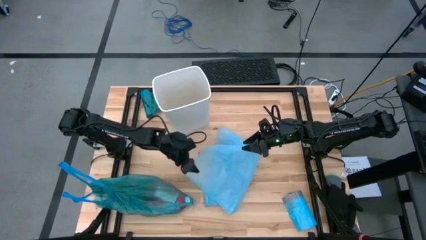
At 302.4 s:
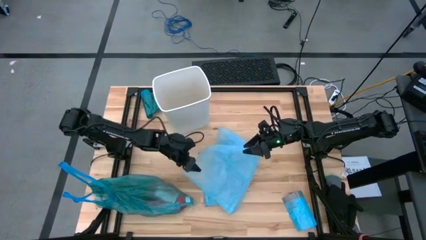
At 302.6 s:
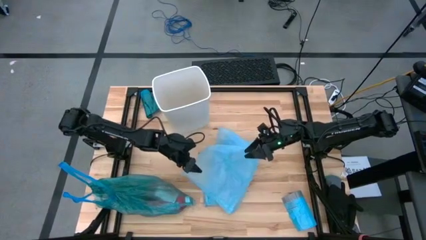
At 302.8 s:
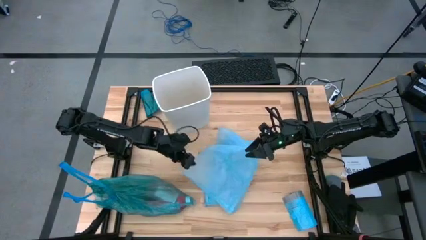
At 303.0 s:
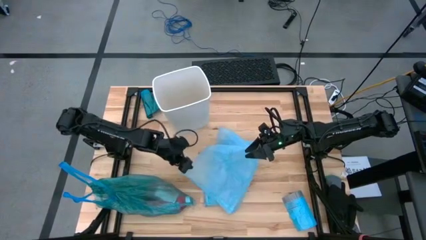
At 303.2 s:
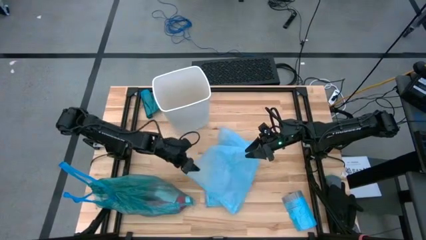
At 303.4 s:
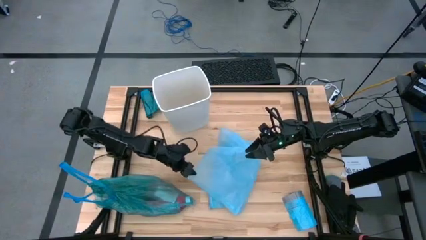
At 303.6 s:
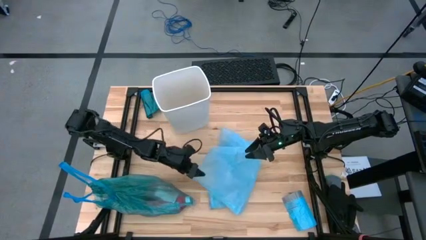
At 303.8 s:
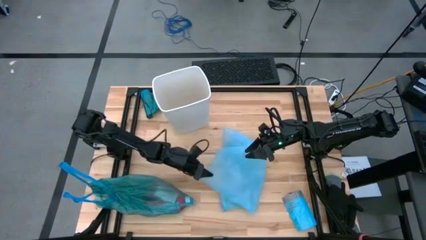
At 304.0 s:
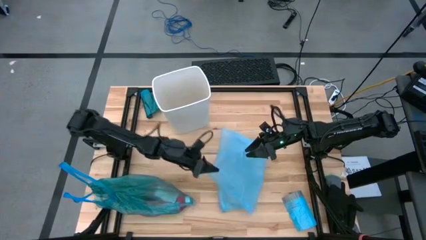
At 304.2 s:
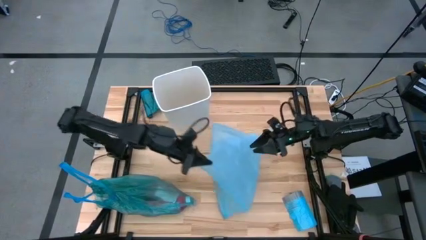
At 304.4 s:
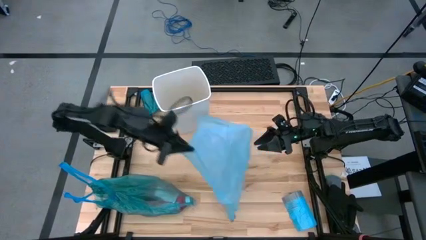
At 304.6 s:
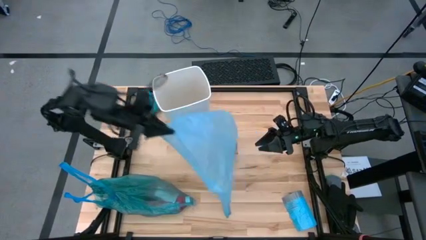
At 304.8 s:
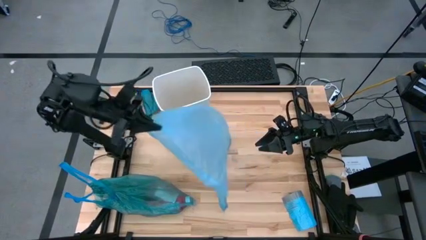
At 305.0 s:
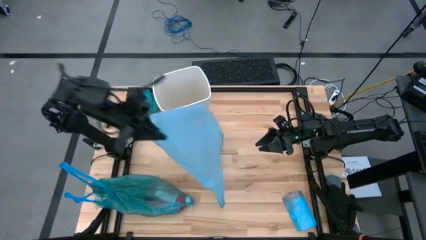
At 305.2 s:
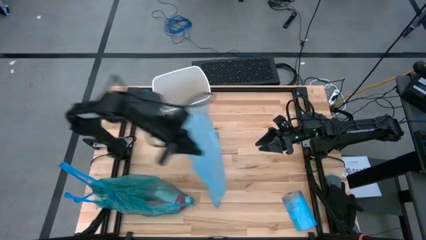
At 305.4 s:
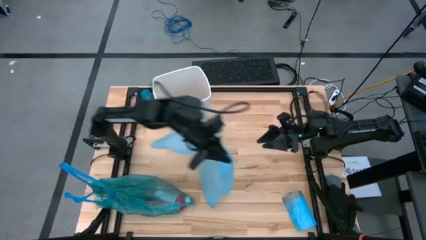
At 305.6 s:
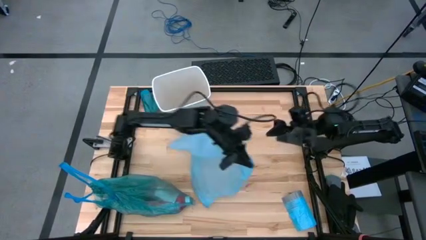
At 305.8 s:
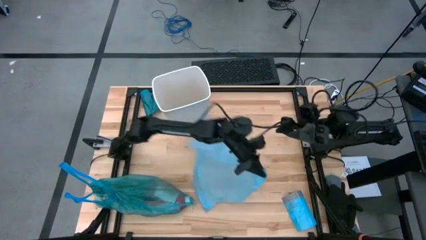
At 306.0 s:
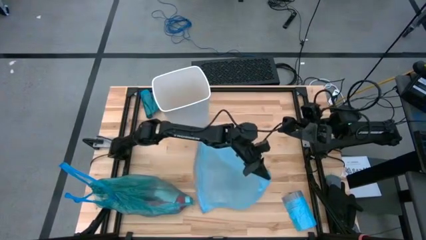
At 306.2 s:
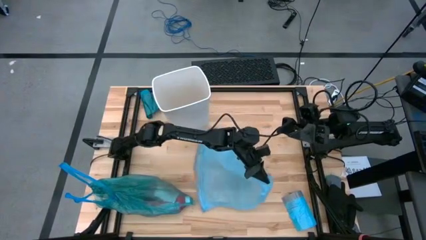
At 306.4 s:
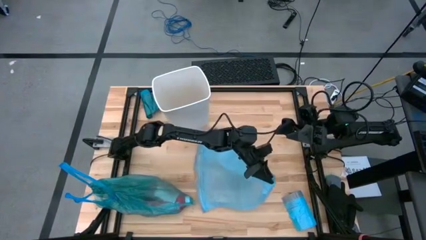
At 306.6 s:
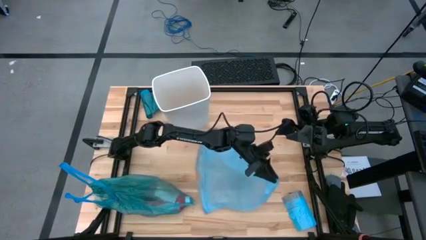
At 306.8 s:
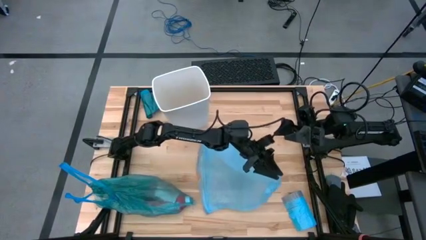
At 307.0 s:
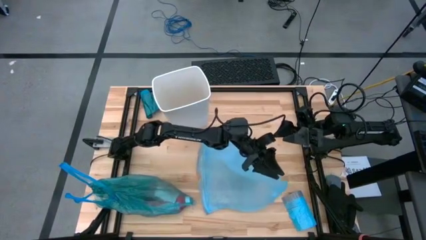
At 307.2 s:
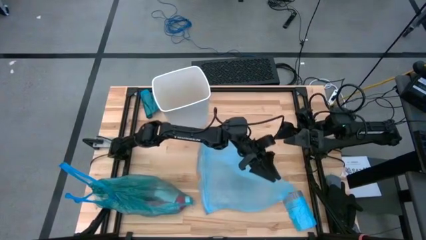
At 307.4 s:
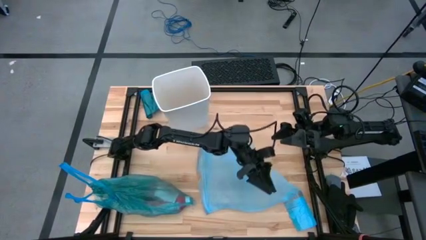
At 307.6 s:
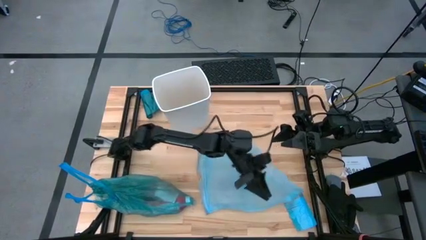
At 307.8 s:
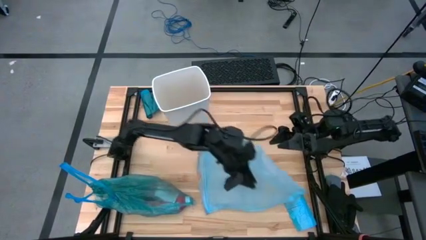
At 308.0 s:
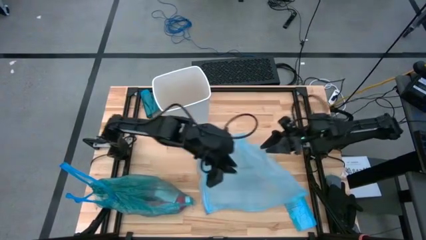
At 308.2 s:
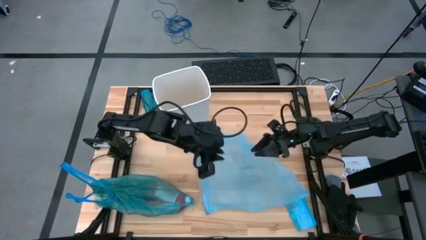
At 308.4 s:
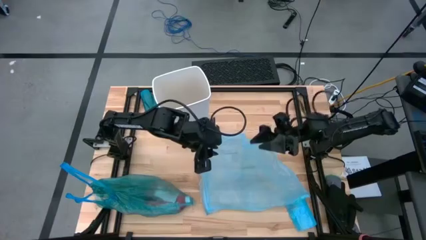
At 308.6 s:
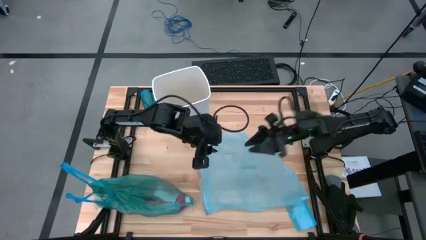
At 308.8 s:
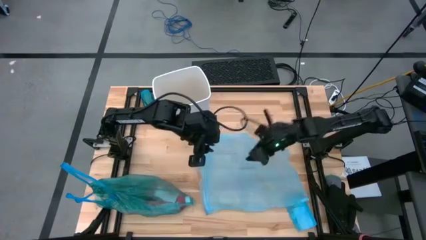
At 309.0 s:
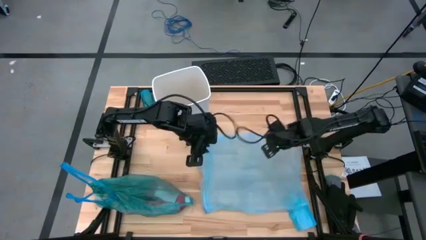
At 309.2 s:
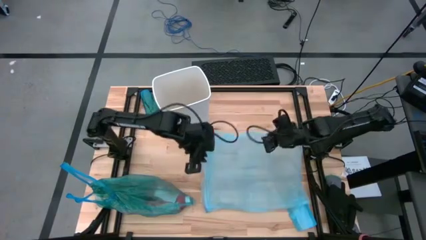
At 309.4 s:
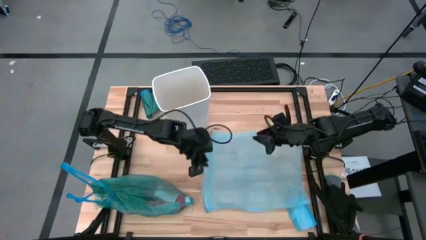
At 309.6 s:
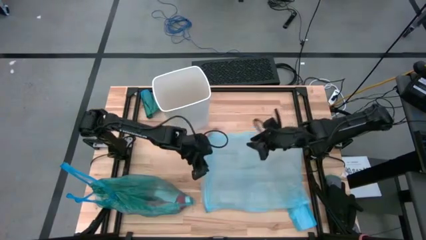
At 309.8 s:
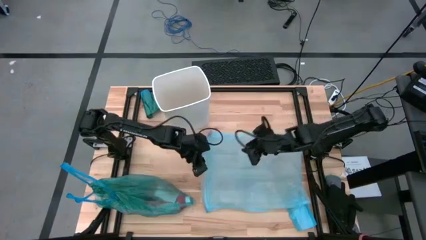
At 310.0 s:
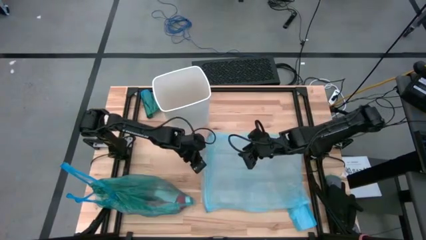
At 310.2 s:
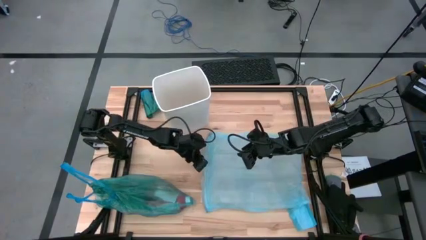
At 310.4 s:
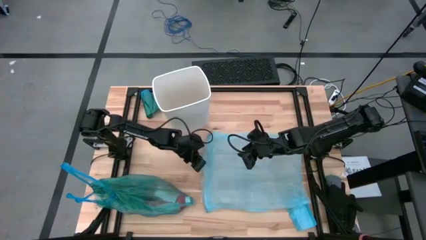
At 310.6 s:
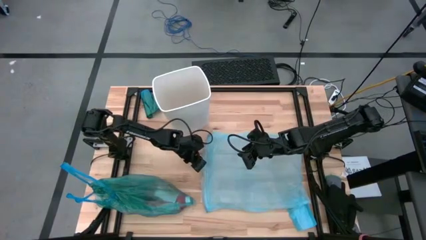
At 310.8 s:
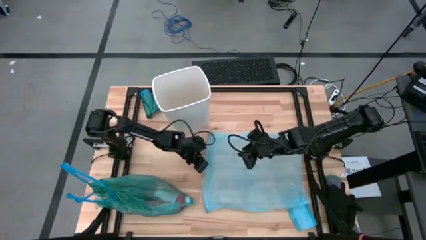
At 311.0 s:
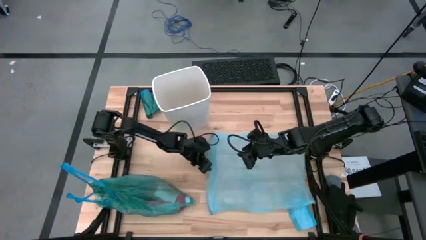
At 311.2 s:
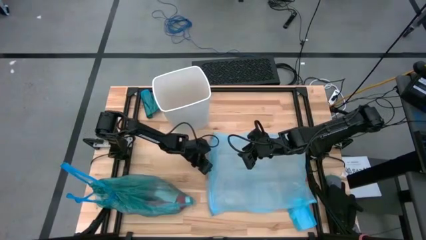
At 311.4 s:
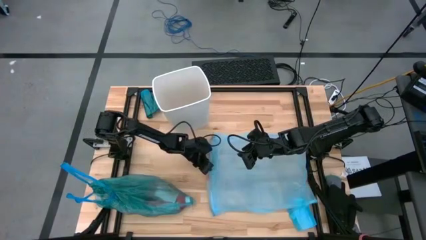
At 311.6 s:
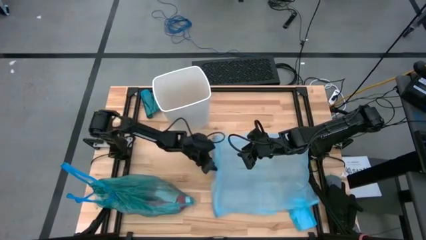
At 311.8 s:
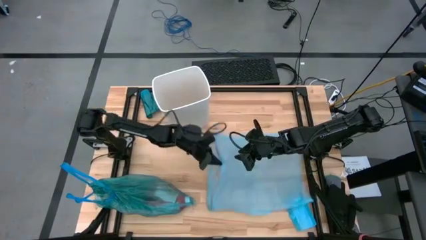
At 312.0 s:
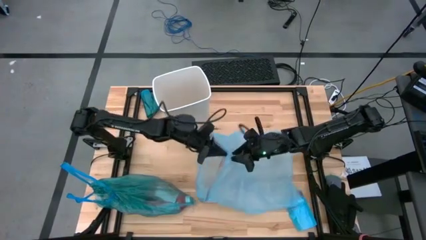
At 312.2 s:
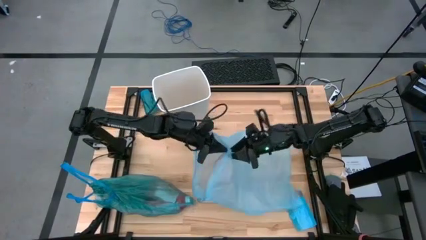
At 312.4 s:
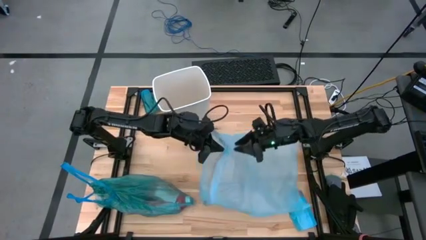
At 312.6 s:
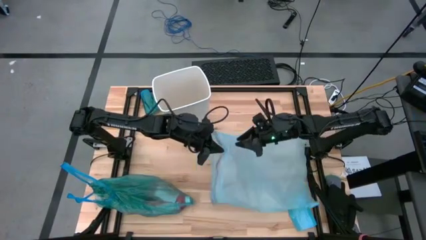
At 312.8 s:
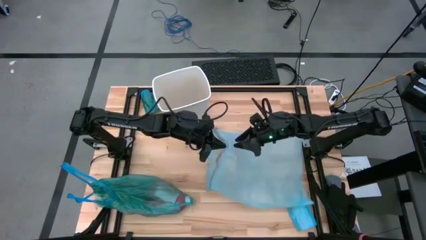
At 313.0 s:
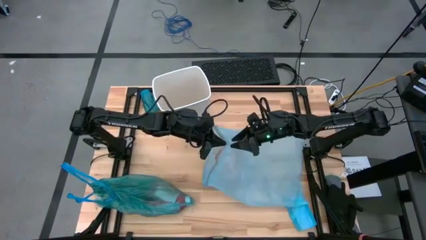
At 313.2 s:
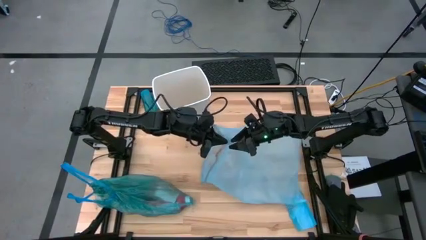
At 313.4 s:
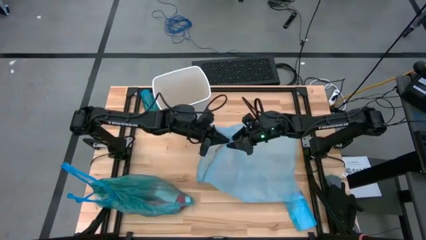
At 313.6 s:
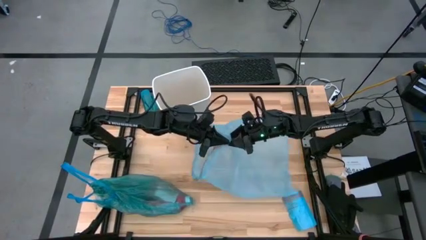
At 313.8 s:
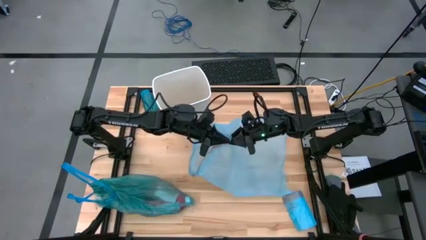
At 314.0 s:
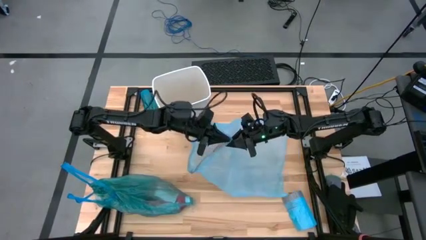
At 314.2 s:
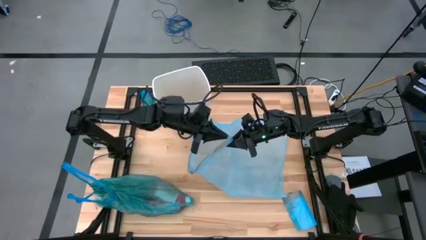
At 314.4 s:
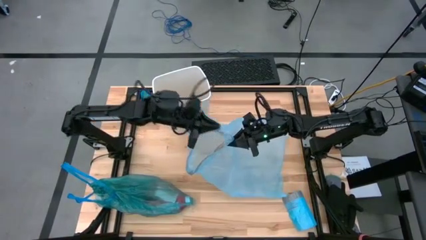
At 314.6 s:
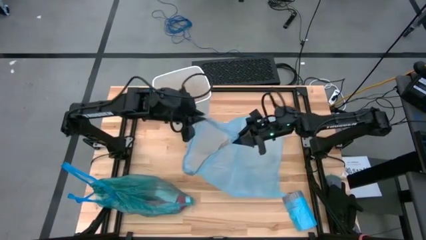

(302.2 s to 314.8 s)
Task: place trash/remove bag and relplace
Open the new blue trash bag

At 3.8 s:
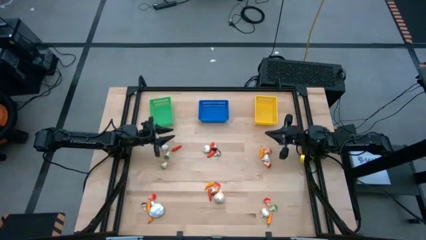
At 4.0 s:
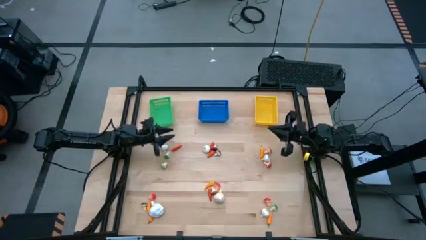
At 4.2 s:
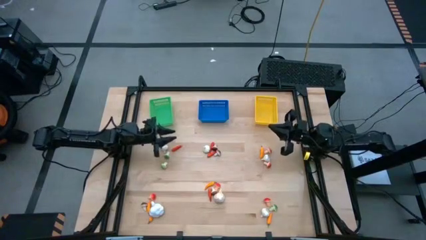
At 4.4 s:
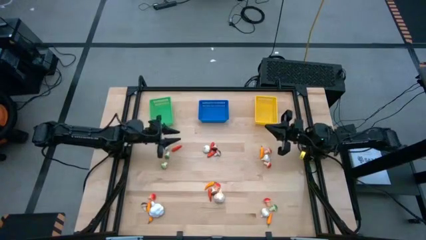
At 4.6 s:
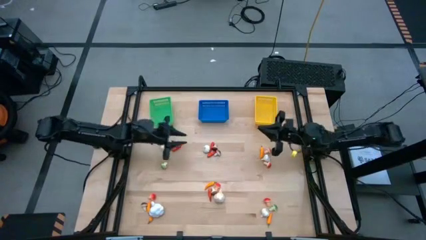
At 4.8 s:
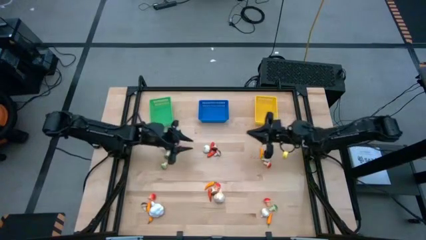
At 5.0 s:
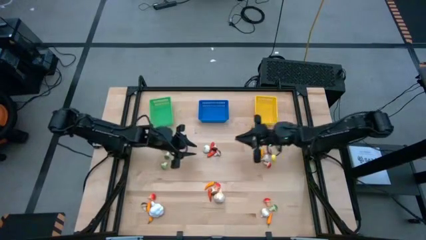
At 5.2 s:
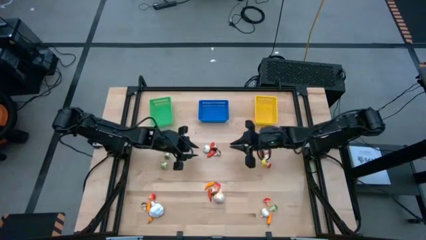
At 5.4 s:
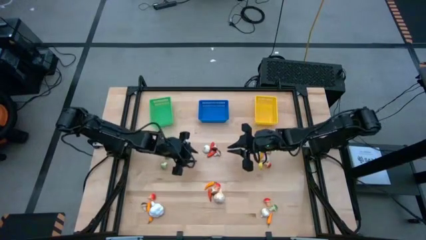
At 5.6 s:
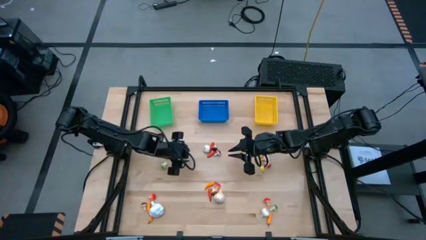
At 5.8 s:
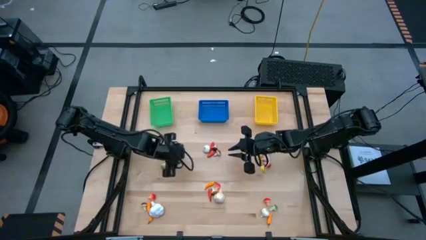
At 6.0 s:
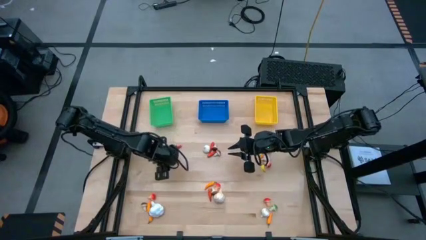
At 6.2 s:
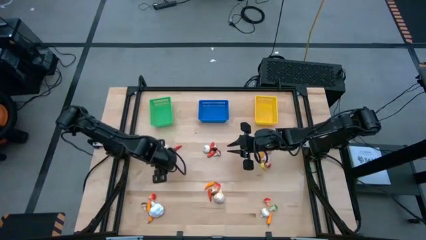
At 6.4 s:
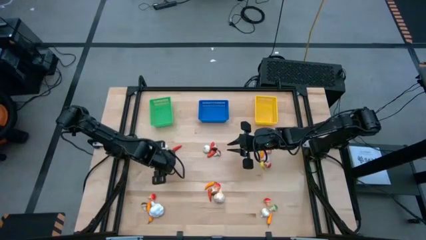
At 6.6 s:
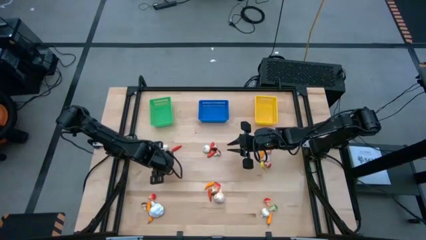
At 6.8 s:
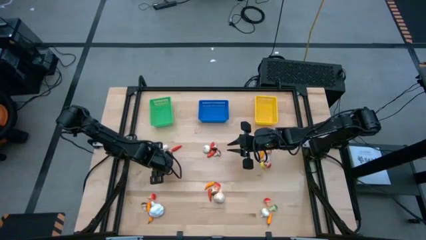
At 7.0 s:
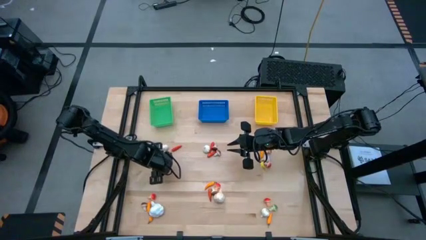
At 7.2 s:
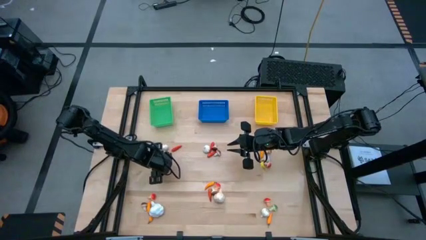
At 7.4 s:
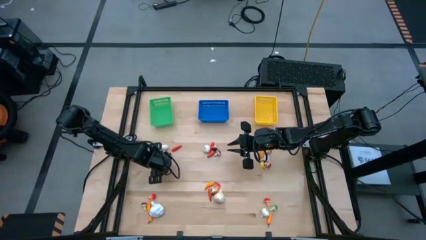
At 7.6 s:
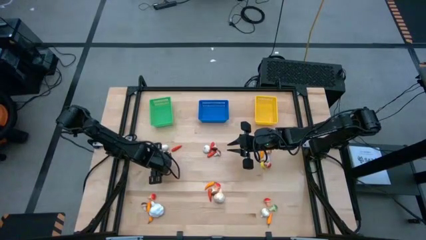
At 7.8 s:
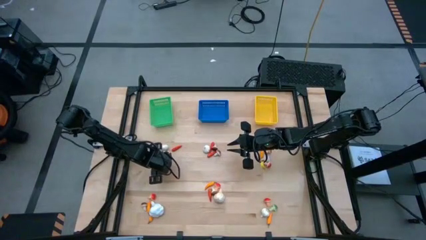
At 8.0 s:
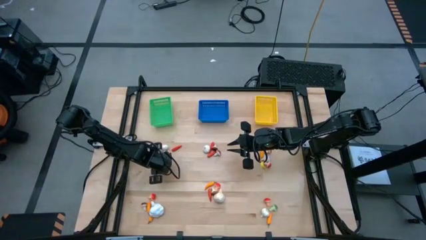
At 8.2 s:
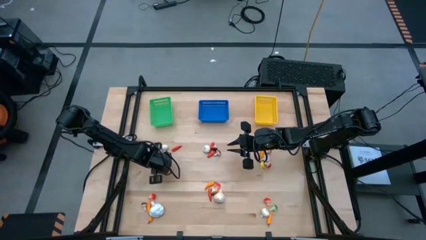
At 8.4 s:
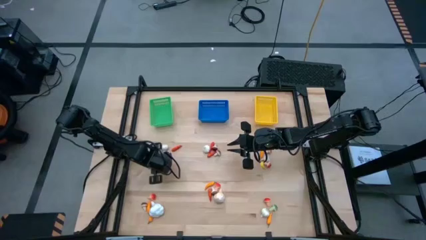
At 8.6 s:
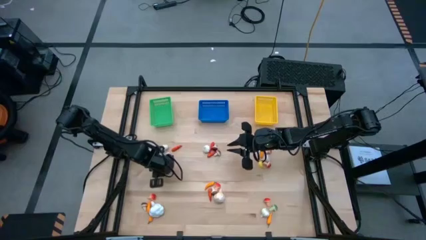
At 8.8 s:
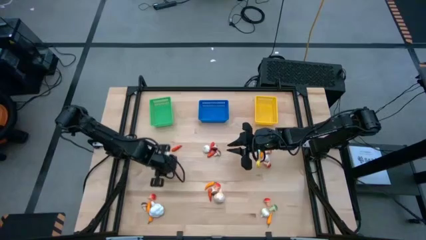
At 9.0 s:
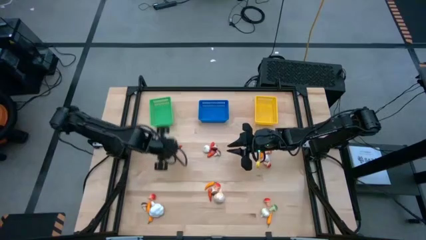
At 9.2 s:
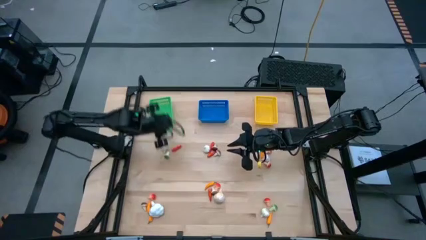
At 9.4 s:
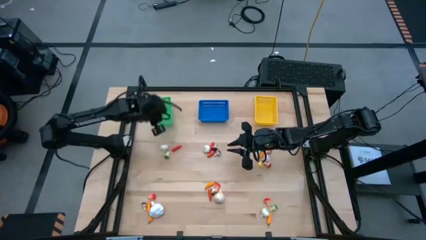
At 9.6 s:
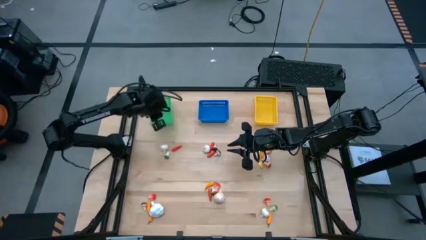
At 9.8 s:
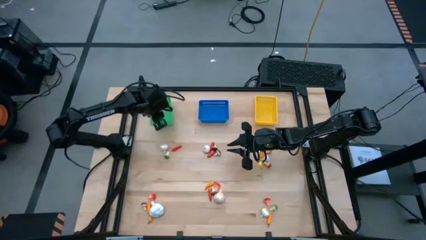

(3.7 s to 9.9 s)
Task: Sort produce into baskets
Put the green mushroom into the green bin
